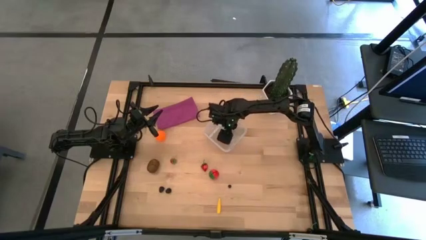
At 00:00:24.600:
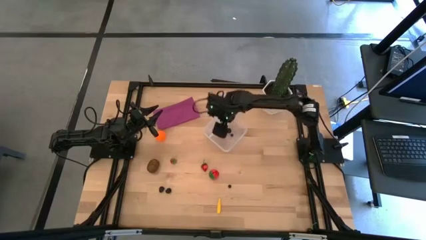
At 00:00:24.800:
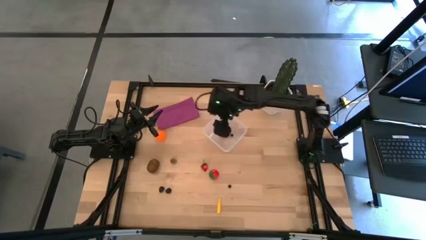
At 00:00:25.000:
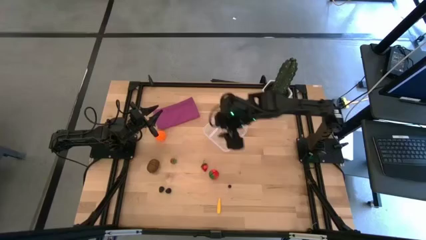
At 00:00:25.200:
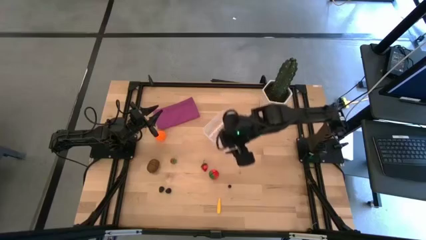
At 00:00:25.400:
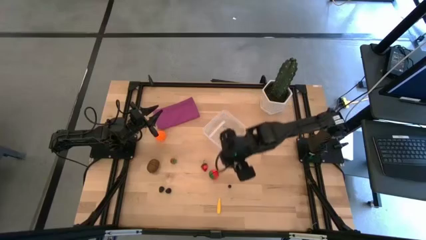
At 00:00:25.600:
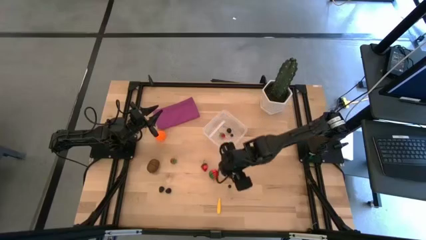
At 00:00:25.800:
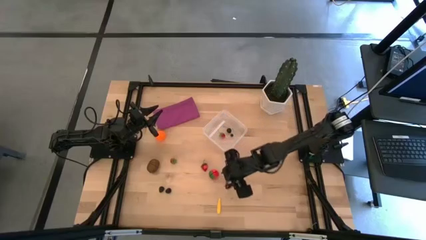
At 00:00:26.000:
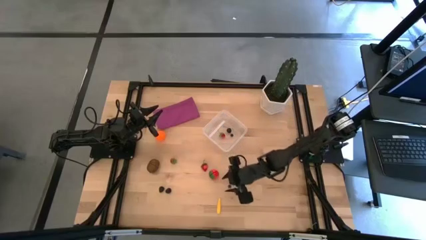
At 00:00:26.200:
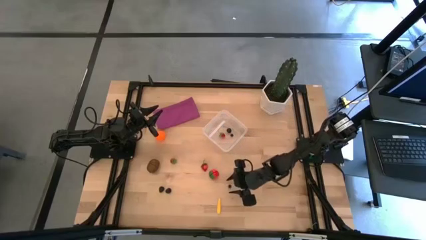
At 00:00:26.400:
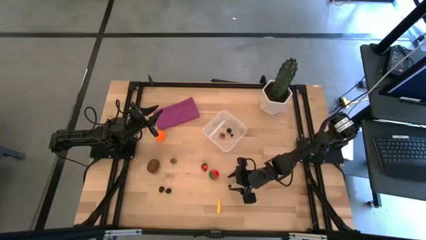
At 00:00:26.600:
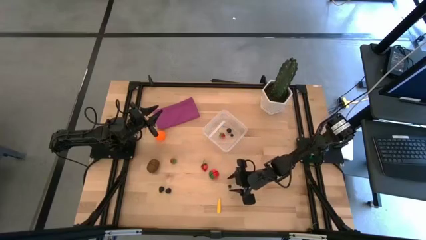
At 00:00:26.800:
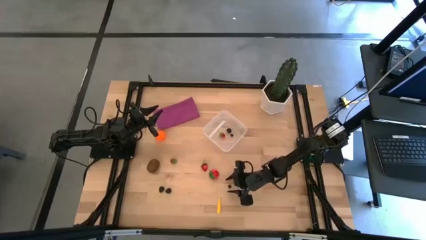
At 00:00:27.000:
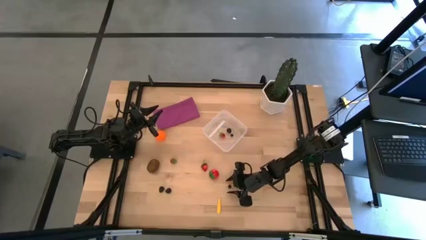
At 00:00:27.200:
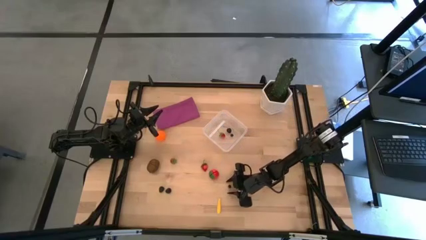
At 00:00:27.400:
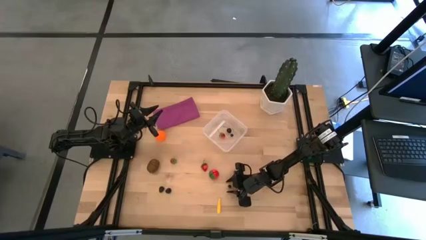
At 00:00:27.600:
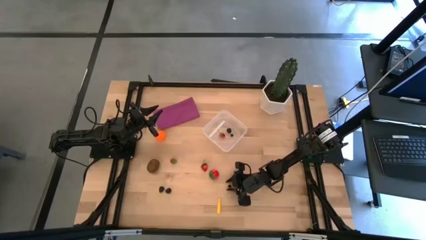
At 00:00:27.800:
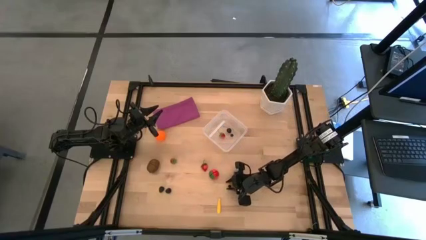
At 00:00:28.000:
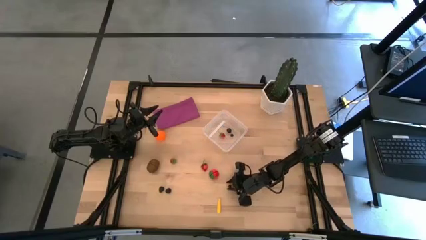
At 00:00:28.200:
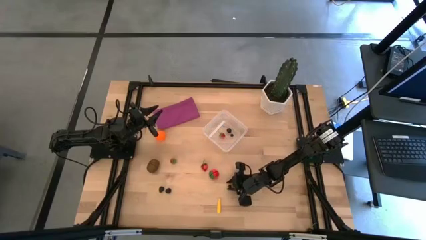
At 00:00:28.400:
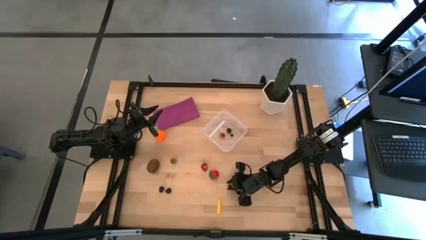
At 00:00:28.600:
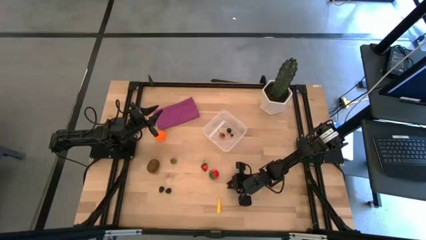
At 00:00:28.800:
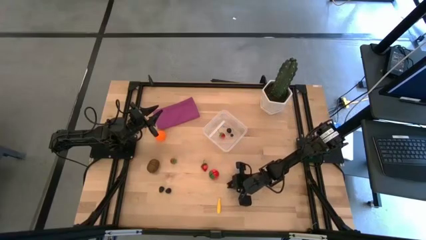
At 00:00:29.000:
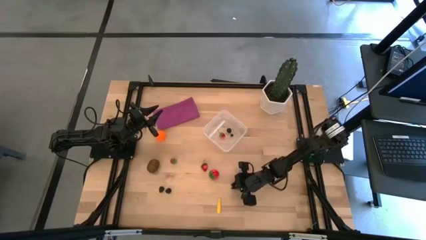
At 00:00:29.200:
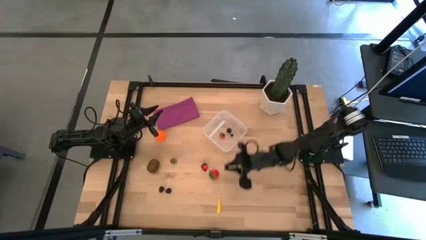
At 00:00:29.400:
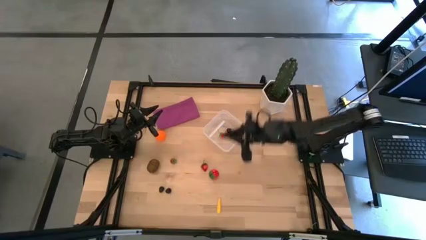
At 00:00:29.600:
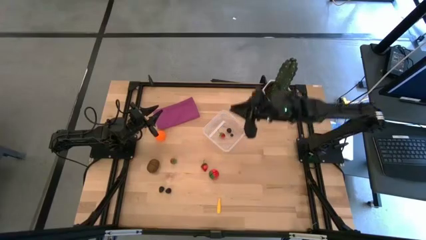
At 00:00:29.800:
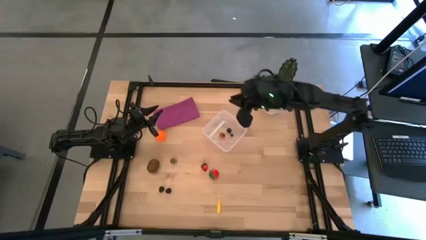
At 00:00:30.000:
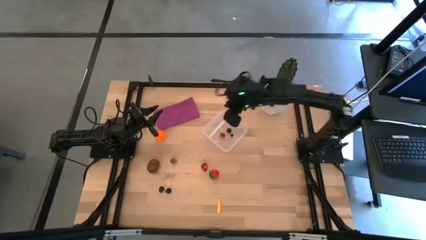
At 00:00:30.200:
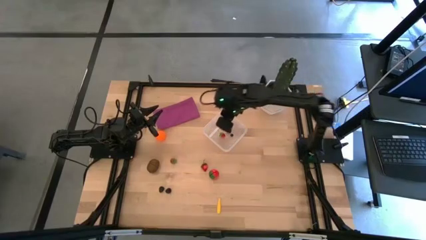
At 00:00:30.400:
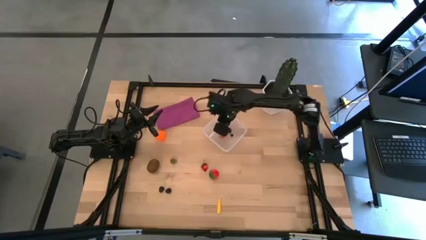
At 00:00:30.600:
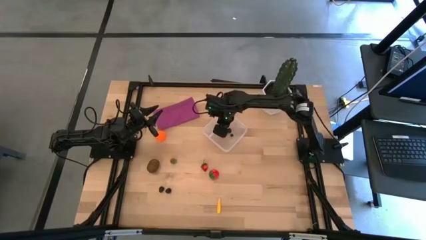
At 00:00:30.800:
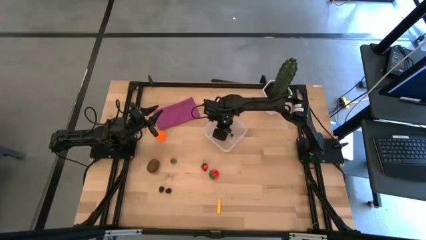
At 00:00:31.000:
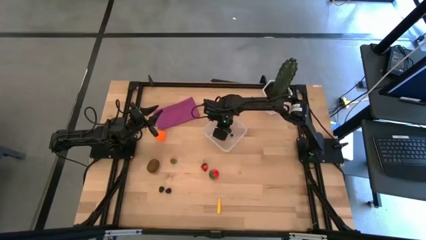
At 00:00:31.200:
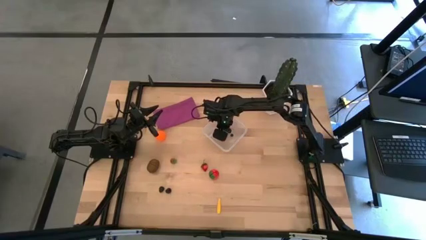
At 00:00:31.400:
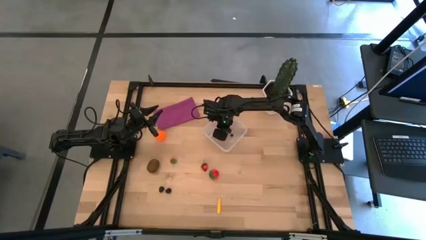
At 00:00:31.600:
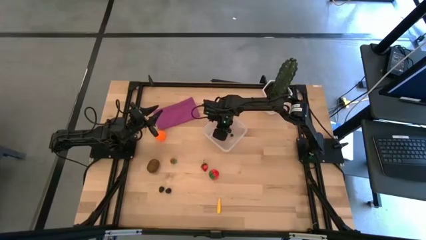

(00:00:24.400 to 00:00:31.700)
Task: Pick and placing Produce into tupperware
Put the blueberry into the transparent container

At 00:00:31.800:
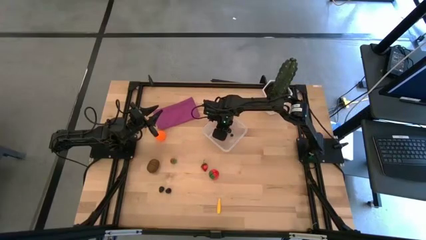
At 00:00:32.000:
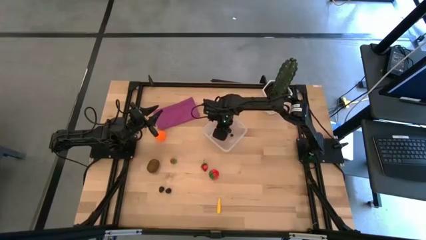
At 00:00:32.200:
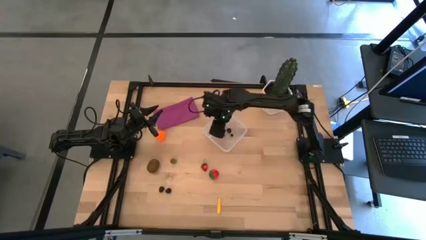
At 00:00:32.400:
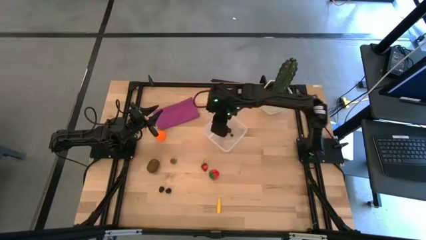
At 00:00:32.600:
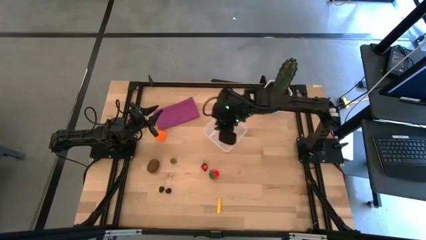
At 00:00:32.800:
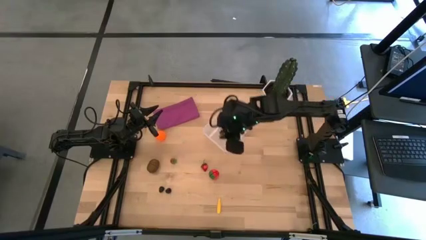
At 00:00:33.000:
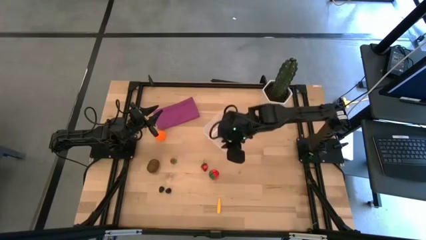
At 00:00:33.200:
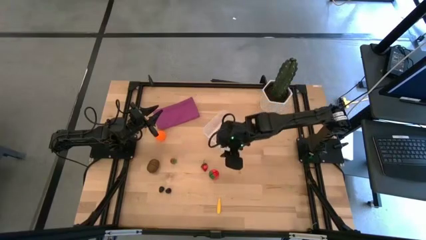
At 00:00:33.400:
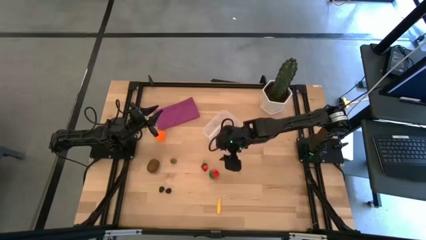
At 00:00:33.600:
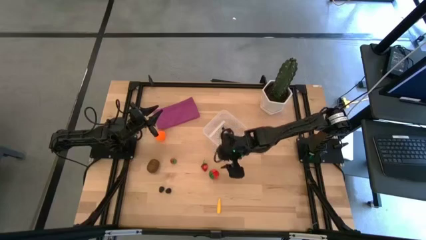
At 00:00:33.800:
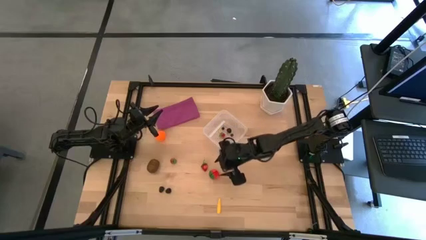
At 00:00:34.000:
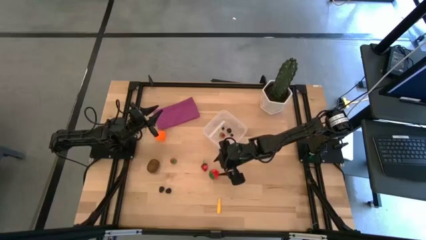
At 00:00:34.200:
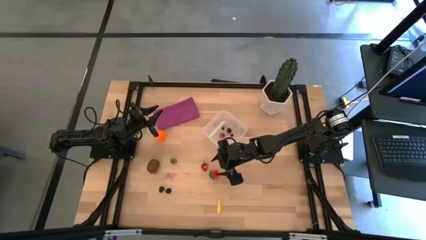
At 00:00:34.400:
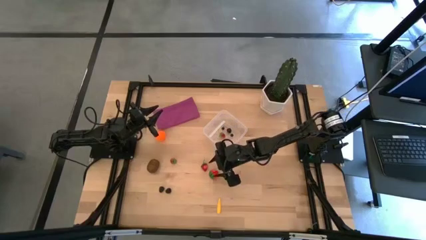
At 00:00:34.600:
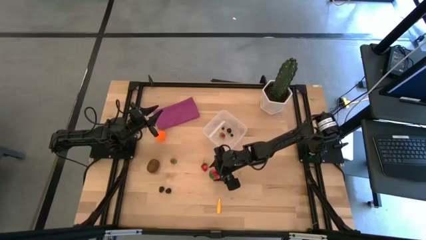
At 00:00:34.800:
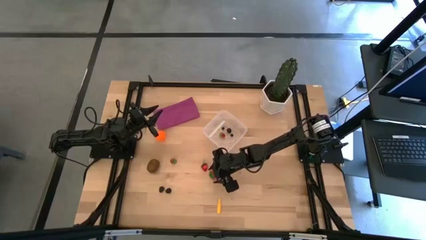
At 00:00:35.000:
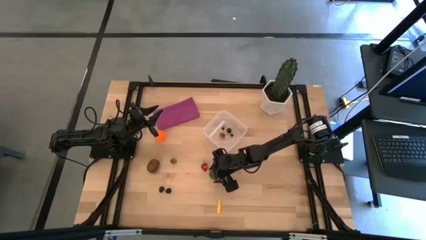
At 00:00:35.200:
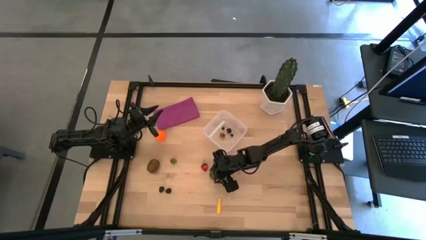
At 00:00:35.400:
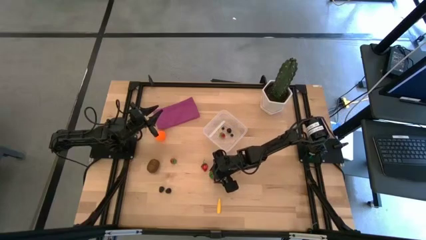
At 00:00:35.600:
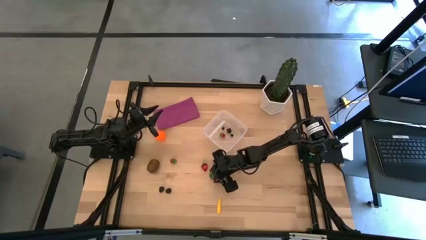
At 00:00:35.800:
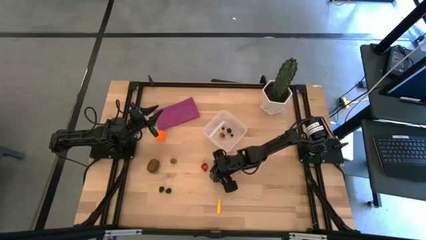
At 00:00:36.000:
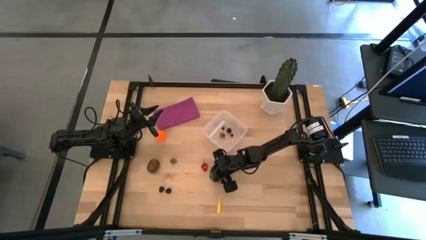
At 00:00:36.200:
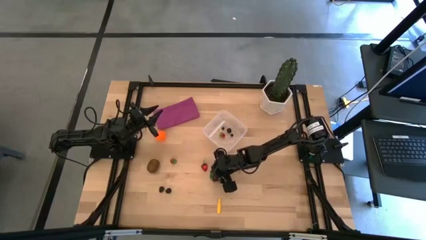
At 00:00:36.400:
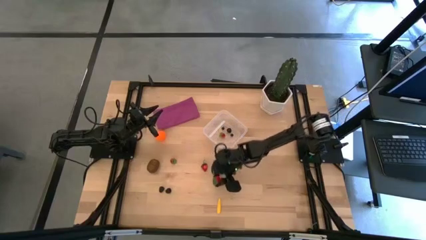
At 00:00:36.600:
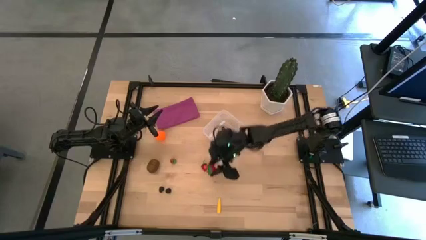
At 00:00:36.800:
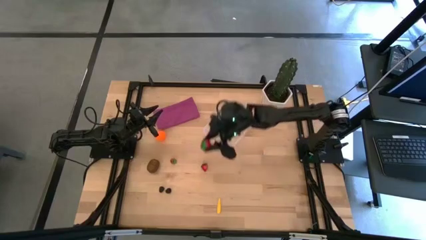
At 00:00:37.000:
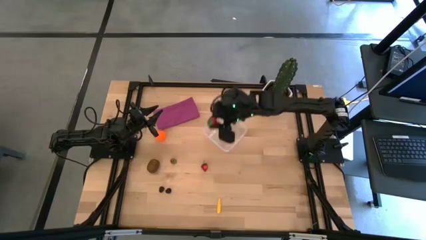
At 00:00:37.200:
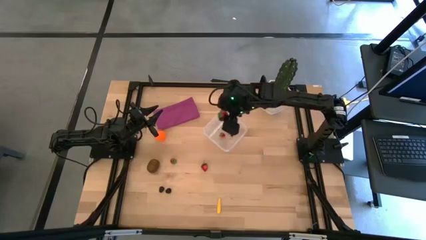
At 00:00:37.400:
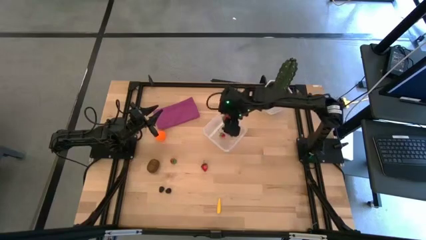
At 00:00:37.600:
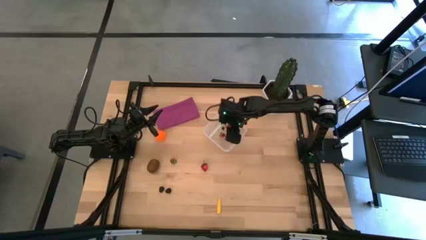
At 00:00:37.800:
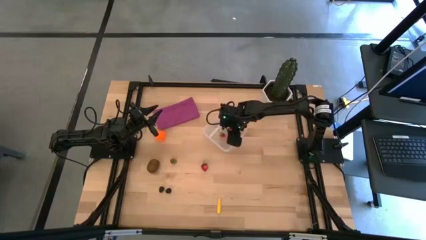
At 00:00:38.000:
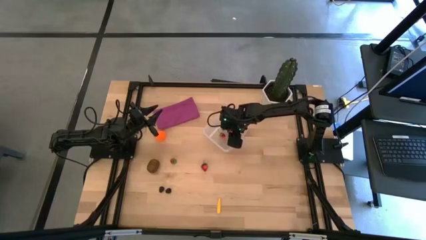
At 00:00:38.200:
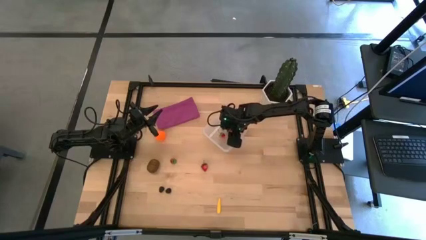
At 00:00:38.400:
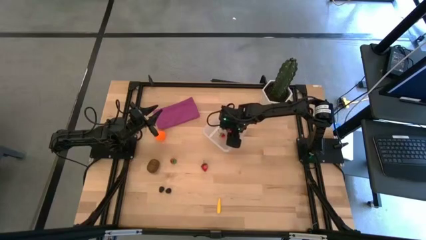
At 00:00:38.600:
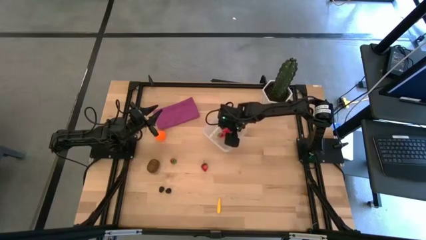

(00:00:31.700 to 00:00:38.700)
Put the right red strawberry into the transparent container

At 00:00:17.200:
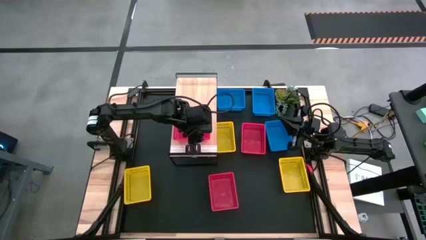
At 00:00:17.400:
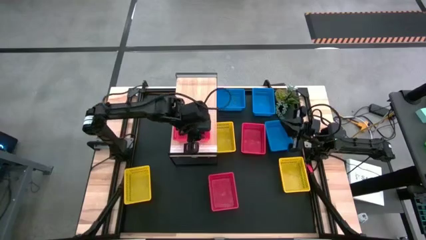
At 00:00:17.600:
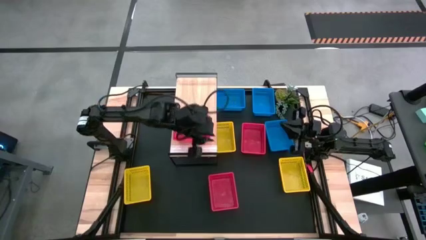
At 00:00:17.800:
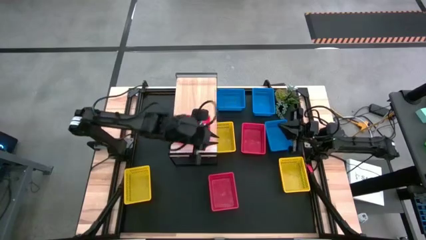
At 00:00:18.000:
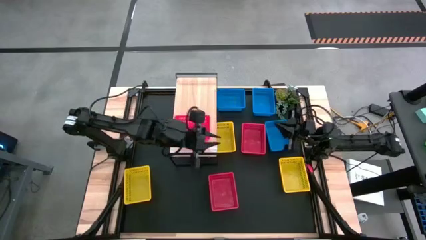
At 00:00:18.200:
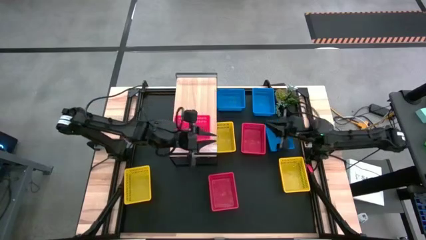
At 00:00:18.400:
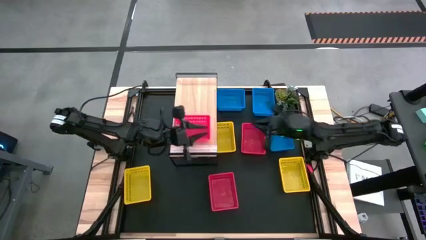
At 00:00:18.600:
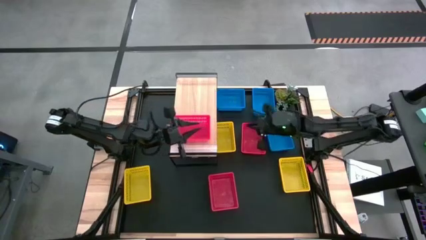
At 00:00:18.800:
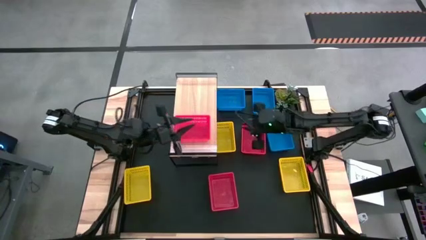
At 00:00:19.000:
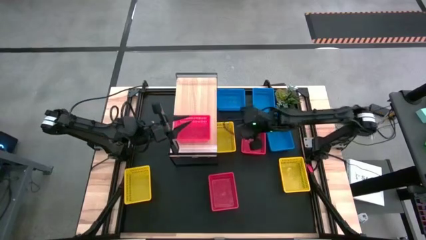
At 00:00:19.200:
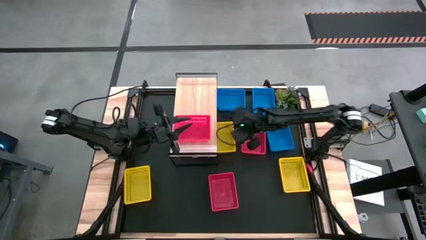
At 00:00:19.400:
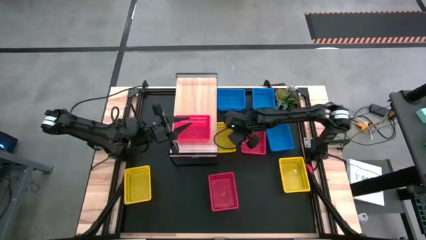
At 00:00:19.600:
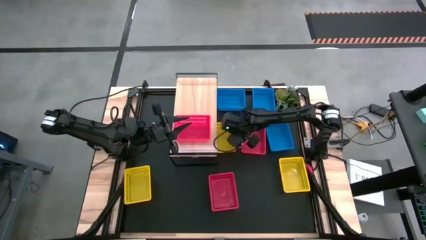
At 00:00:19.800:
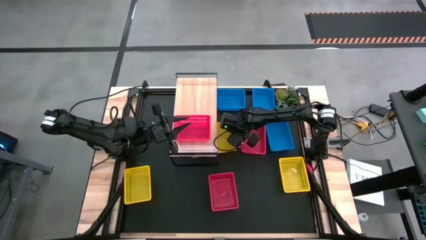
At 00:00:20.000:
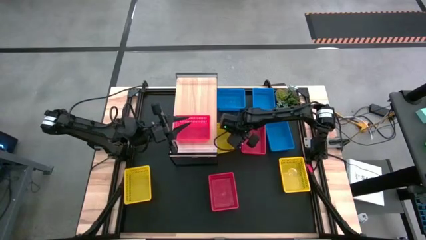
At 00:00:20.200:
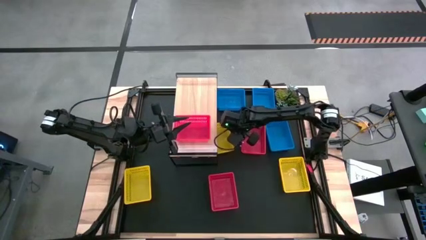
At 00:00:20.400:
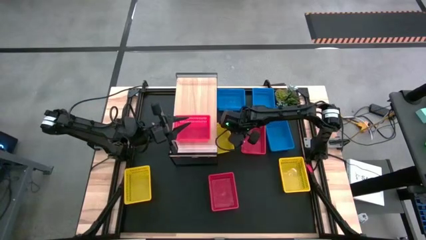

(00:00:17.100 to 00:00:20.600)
Task: Stack baskets on shelf by color
Put the middle yellow bin on the shelf
